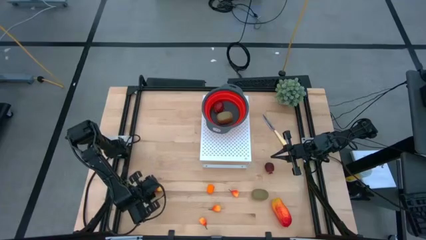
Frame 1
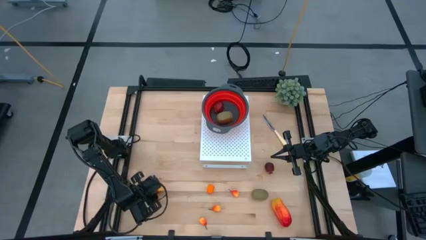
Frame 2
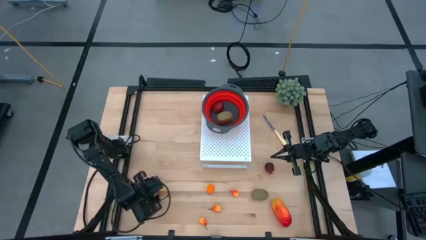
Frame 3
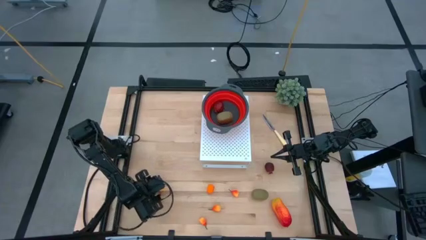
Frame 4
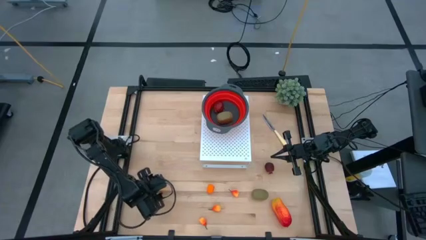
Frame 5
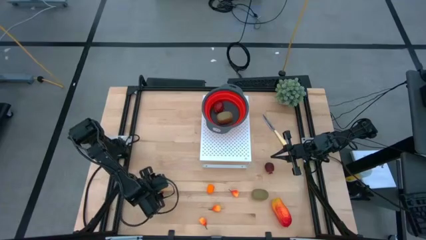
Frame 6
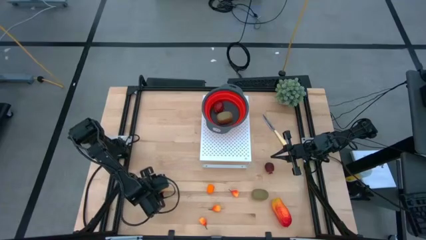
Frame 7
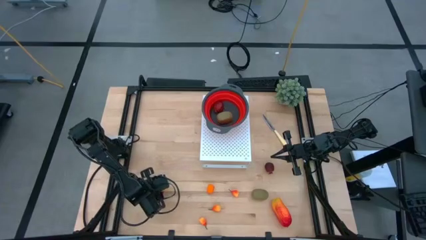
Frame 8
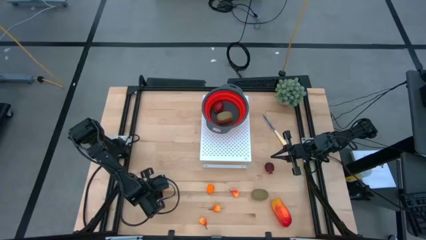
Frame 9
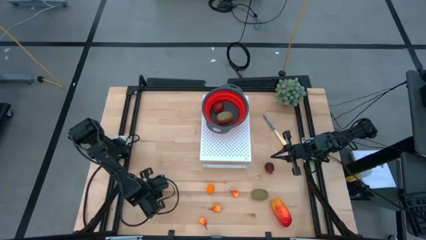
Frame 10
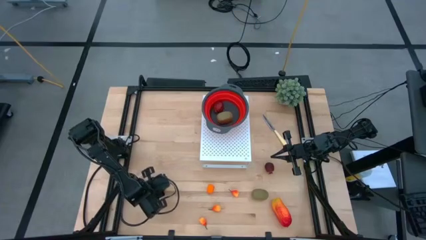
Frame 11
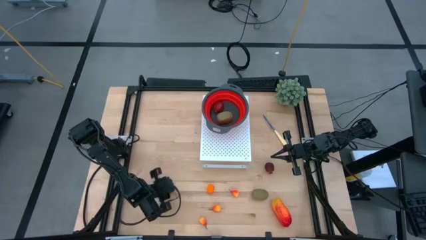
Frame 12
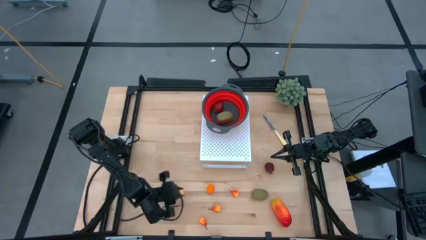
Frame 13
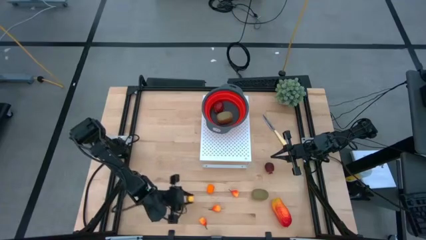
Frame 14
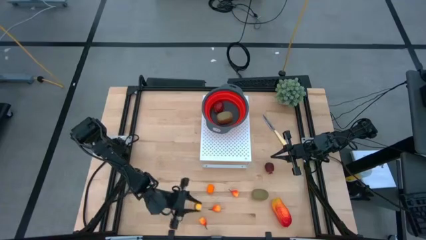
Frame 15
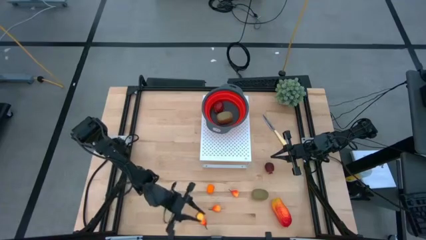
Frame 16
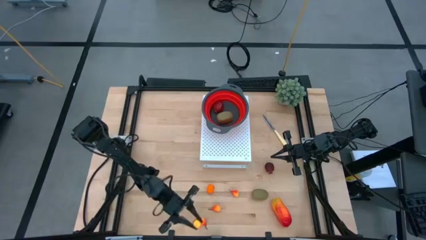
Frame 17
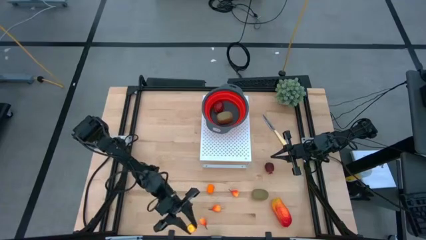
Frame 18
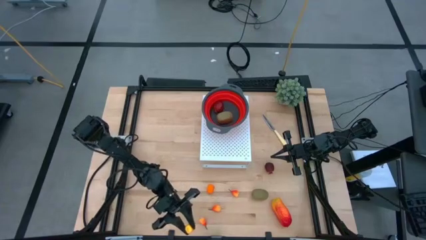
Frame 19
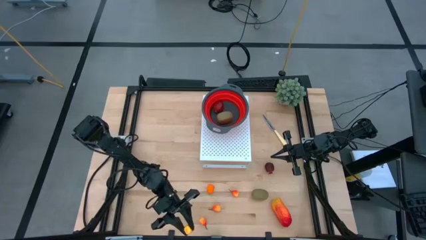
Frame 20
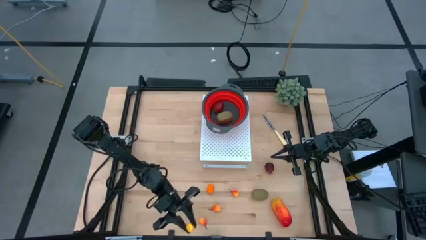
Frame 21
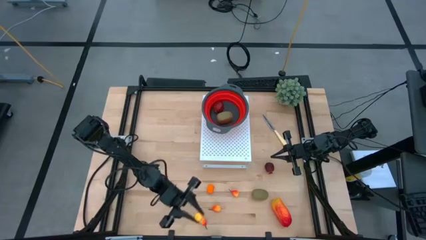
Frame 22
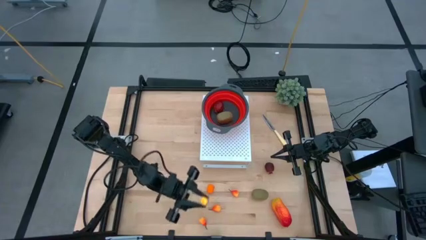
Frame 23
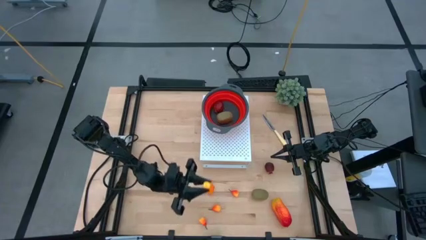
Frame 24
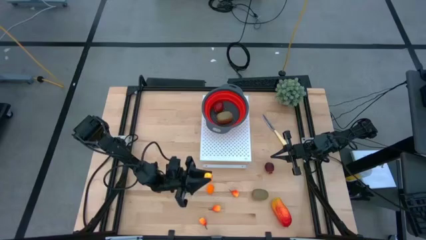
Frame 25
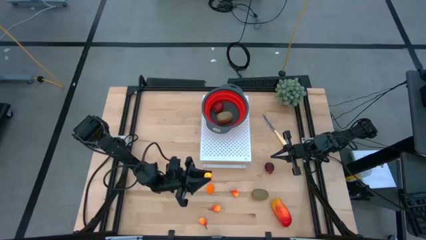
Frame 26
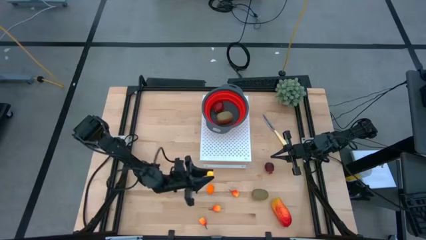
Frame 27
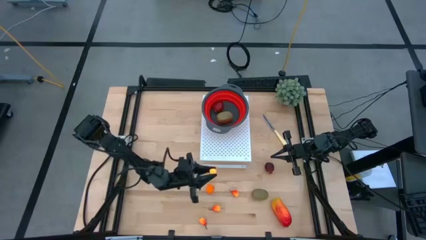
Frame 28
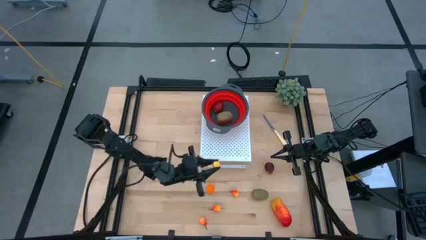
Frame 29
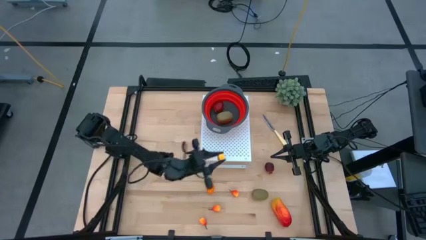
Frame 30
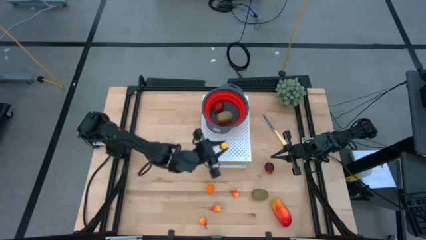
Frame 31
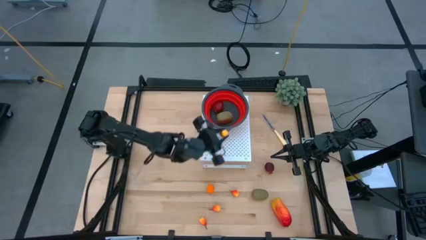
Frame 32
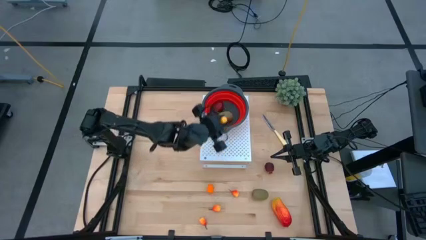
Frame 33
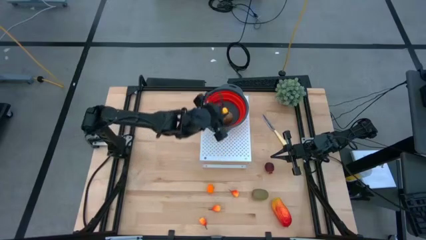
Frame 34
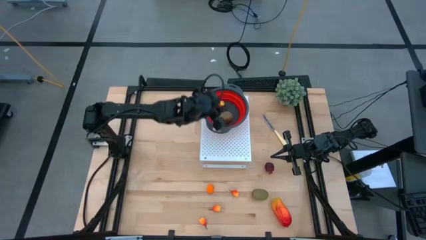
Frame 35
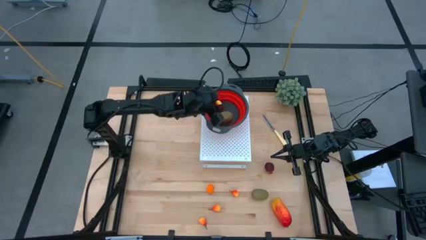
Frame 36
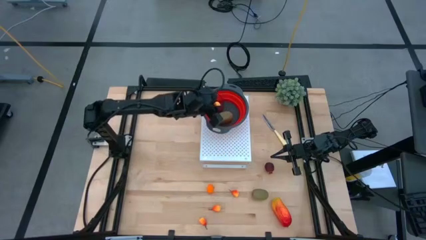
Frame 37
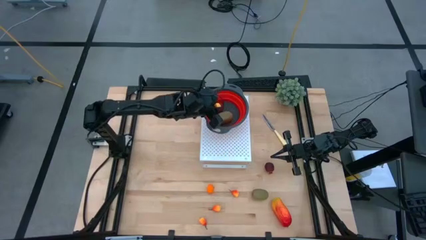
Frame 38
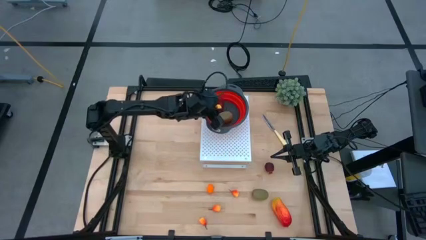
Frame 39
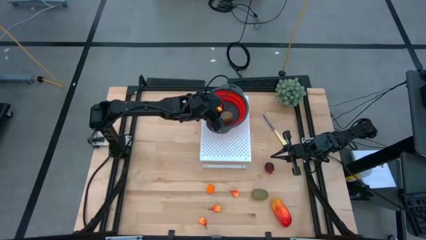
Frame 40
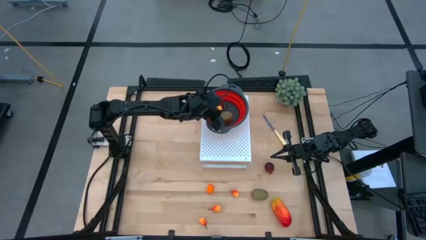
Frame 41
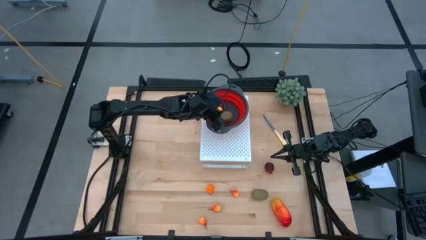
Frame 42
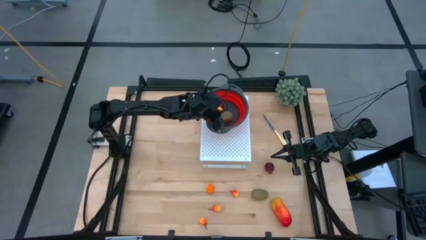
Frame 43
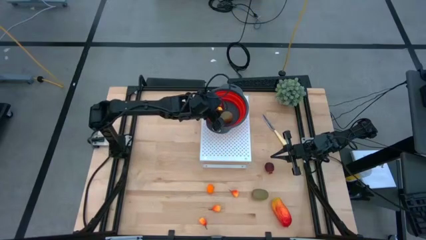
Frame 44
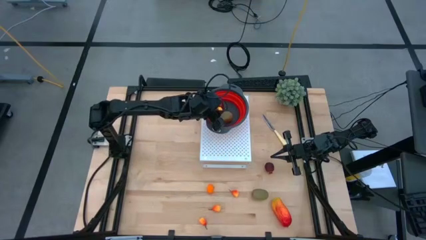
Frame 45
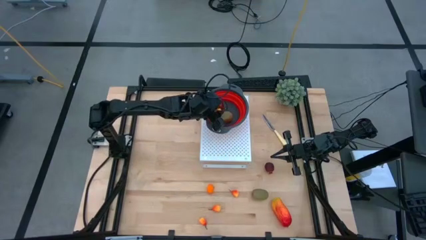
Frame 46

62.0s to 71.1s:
Task: Pick & Place Fruit
Put the orange pear into the red strainer bowl

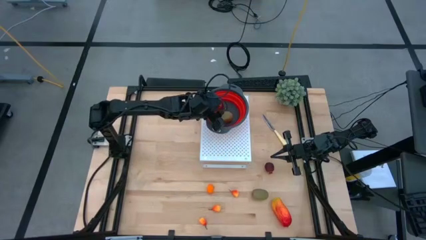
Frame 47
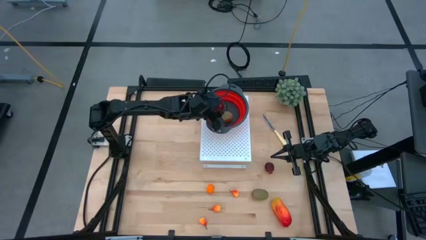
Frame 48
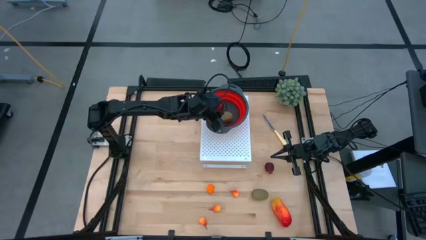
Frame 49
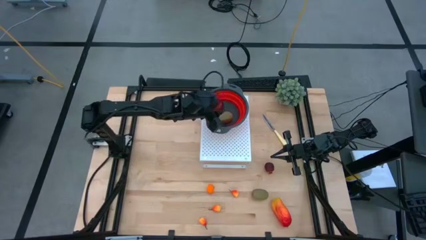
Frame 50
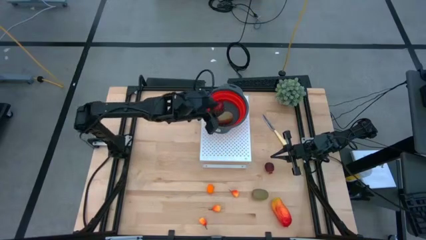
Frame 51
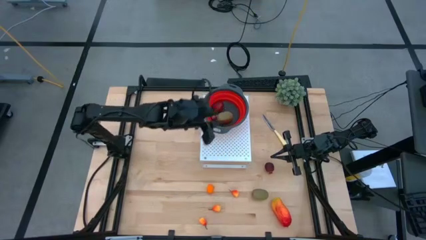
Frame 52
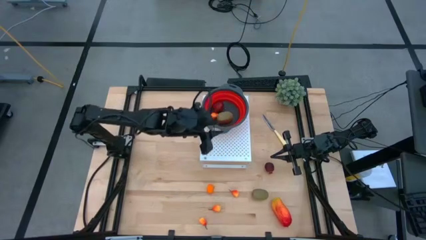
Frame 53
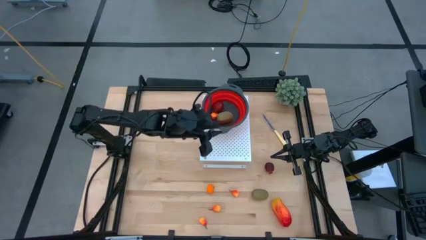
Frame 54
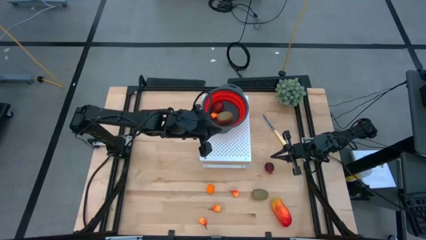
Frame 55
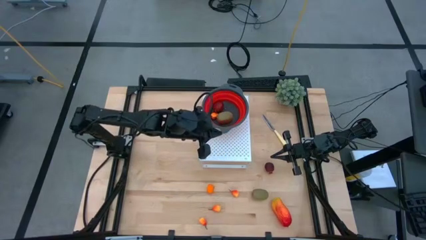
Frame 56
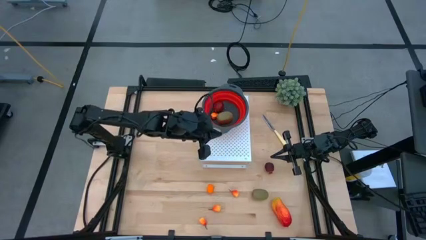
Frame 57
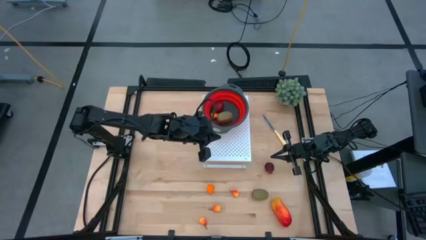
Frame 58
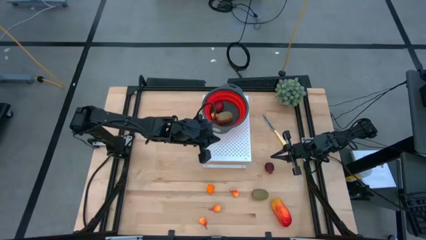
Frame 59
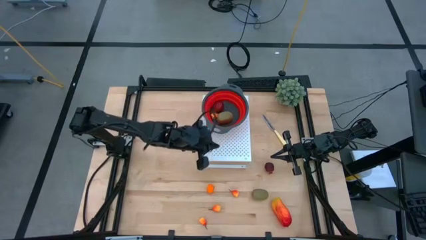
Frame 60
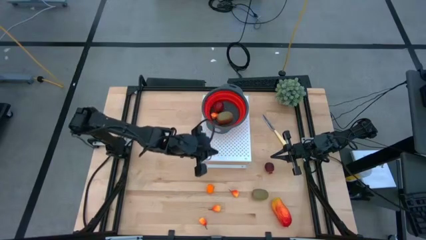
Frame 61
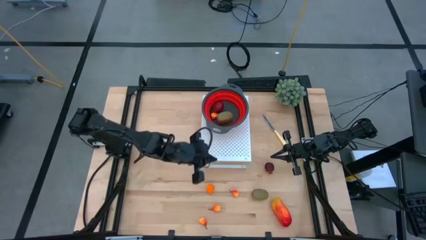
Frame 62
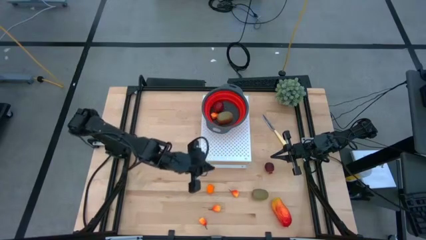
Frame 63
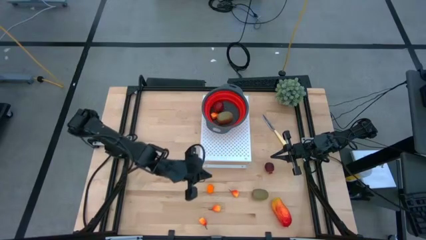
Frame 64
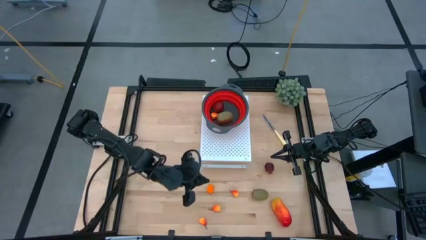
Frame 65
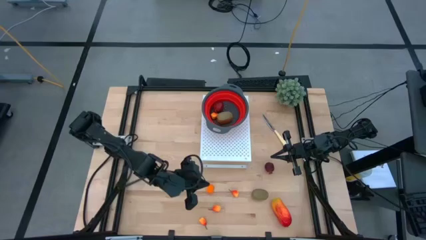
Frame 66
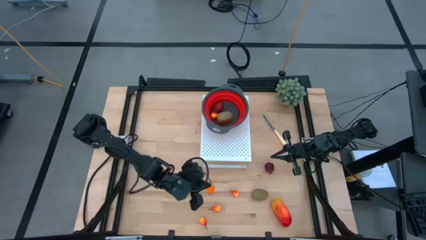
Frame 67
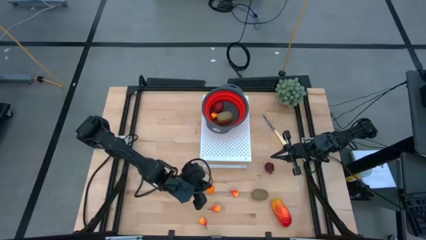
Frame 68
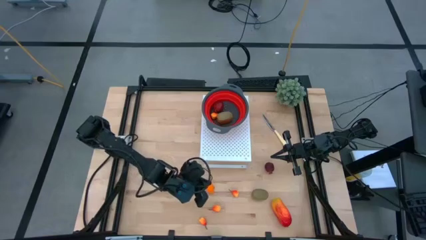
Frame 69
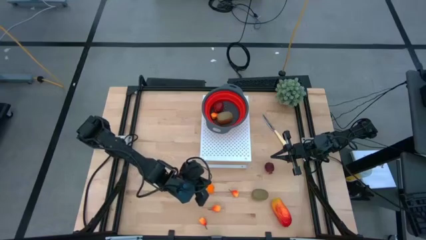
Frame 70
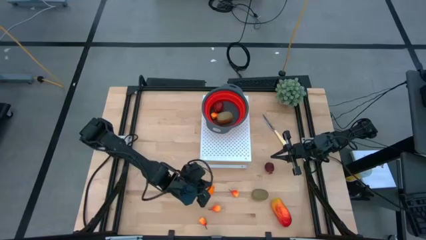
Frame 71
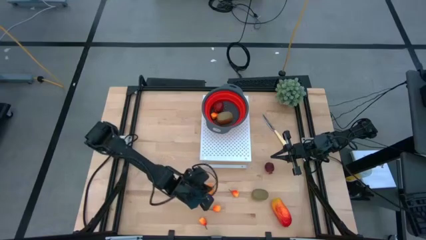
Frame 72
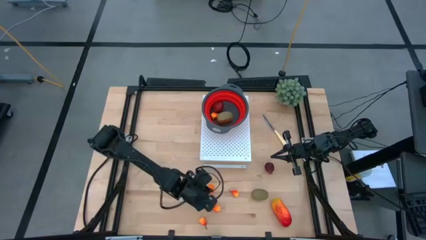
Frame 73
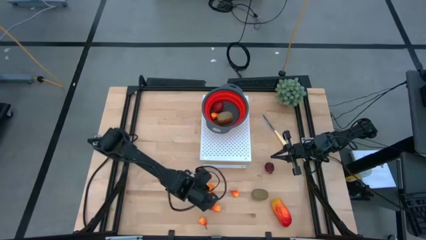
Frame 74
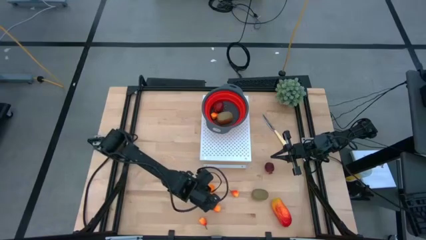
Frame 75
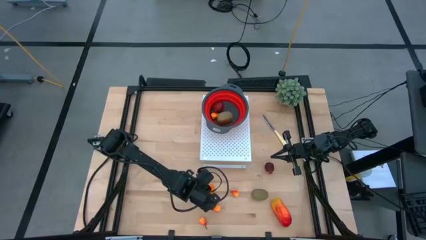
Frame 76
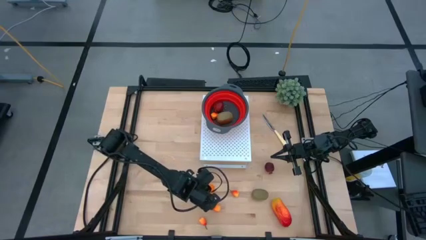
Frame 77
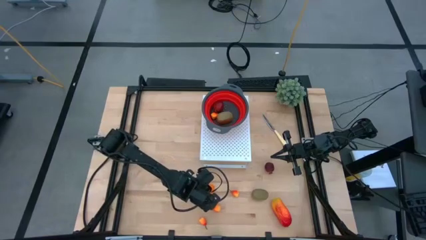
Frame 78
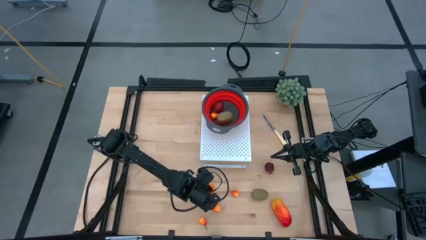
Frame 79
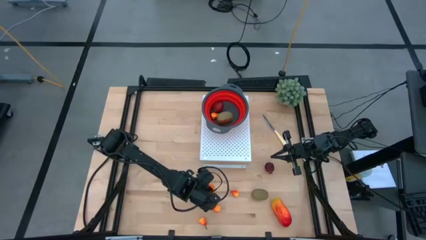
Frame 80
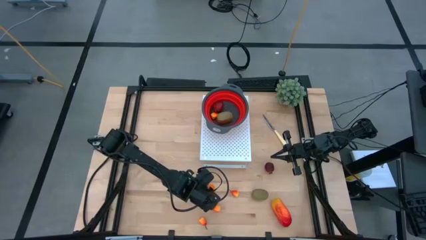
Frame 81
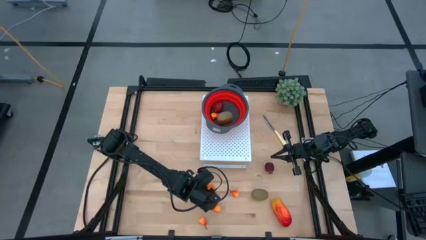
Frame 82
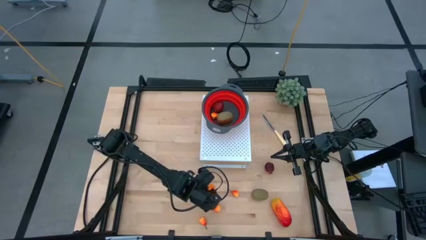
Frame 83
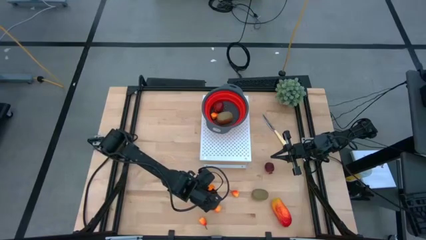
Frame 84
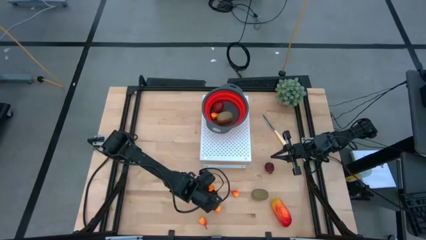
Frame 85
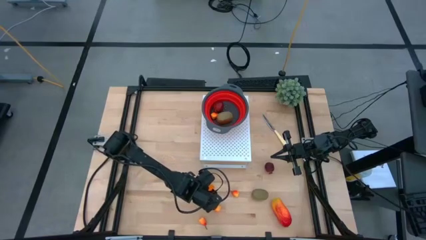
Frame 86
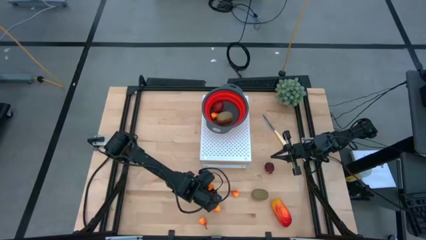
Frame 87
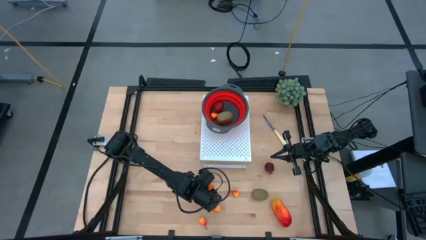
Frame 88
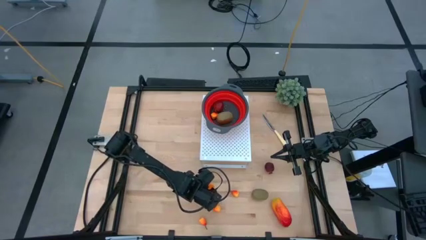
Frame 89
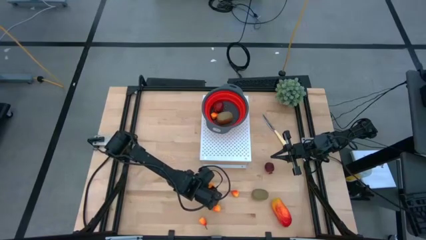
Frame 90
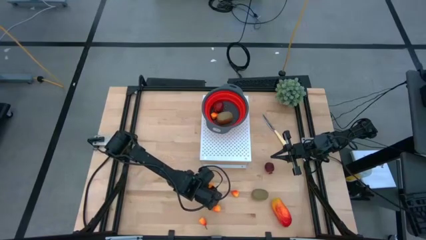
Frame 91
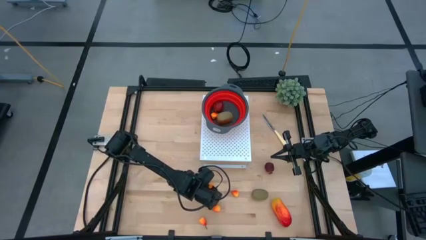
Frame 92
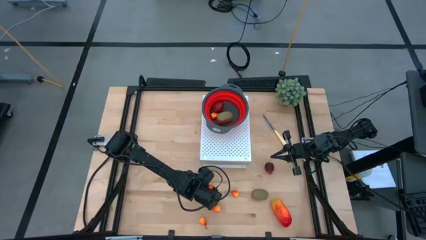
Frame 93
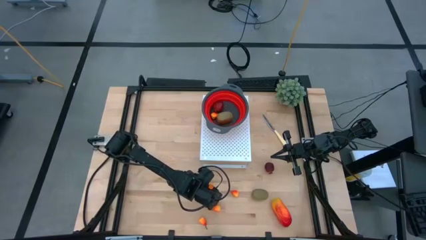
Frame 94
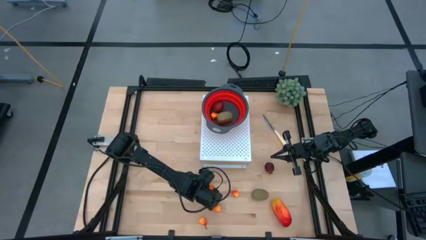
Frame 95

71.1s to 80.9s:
Put the orange into the red strainer bowl
